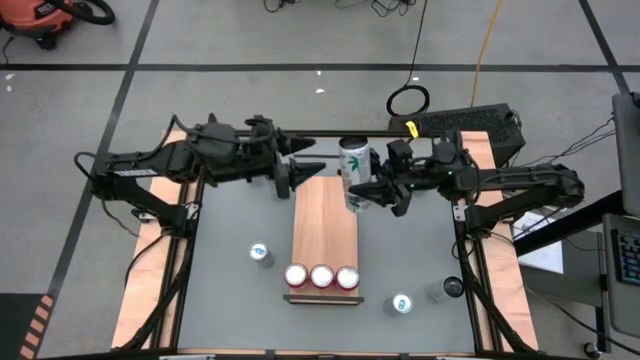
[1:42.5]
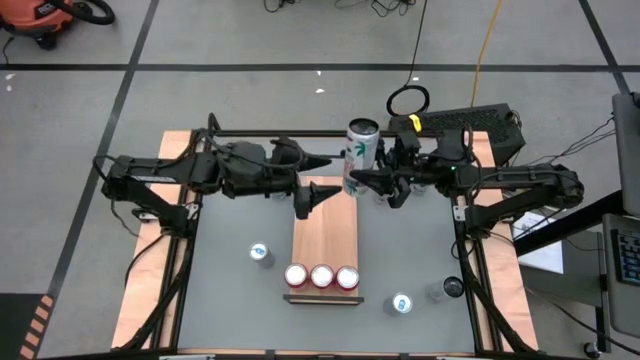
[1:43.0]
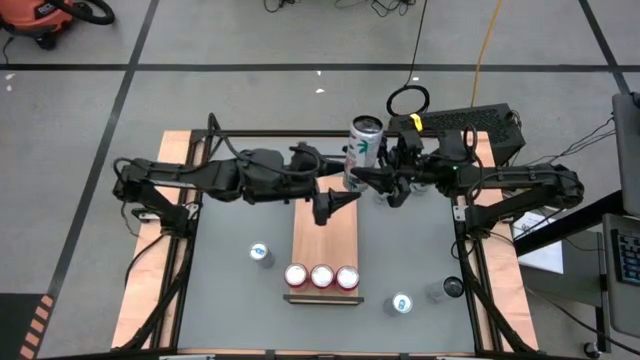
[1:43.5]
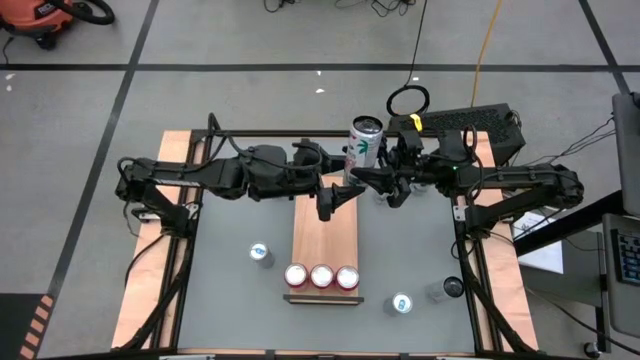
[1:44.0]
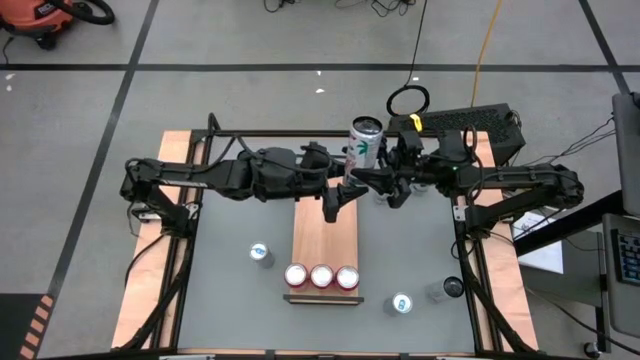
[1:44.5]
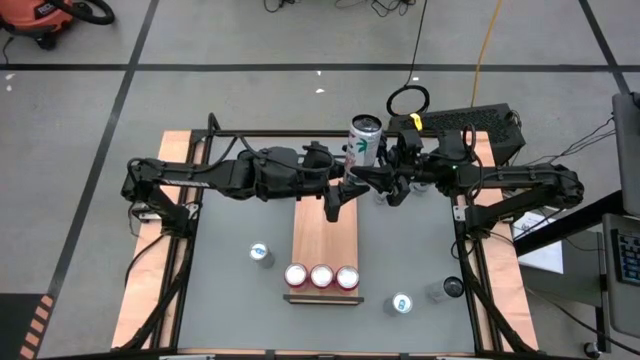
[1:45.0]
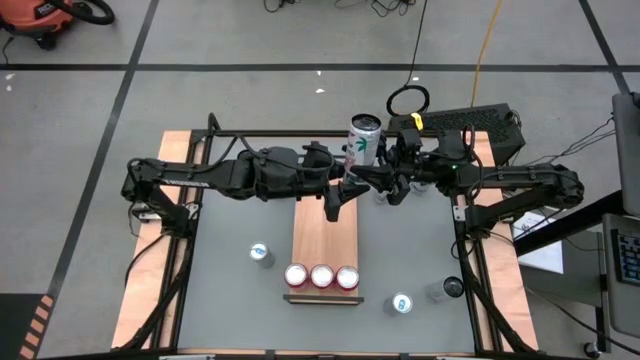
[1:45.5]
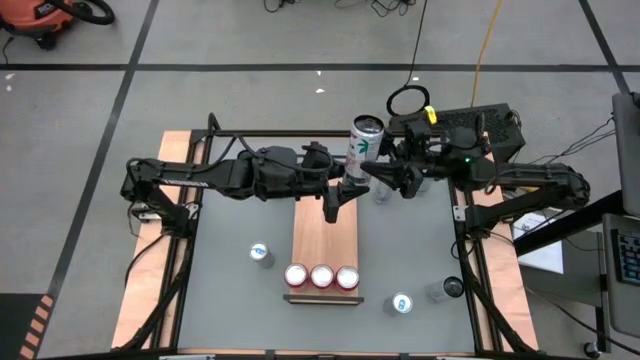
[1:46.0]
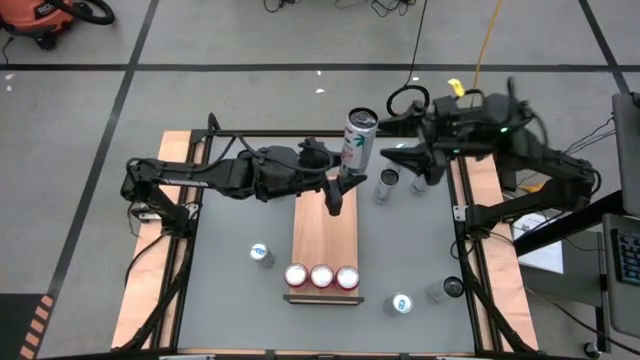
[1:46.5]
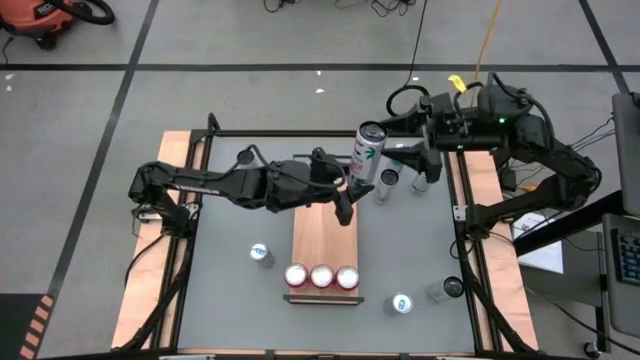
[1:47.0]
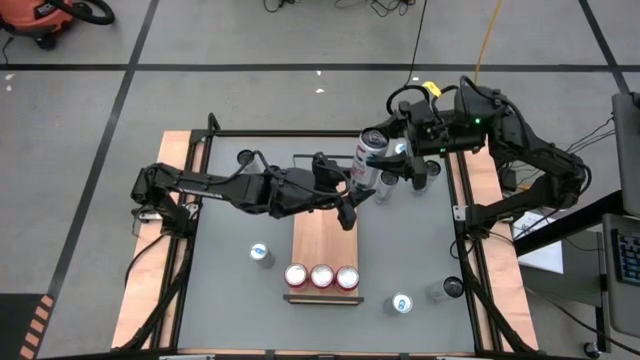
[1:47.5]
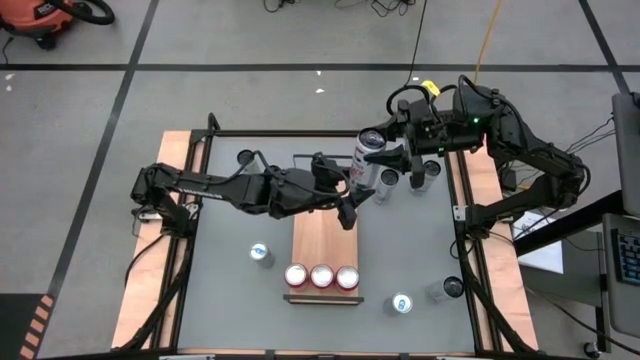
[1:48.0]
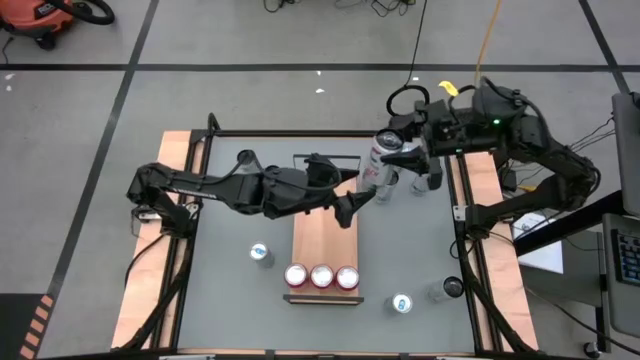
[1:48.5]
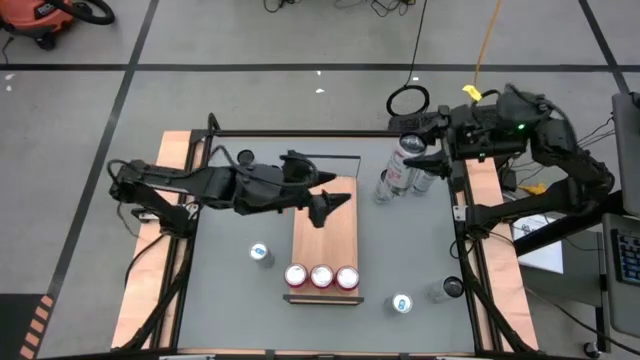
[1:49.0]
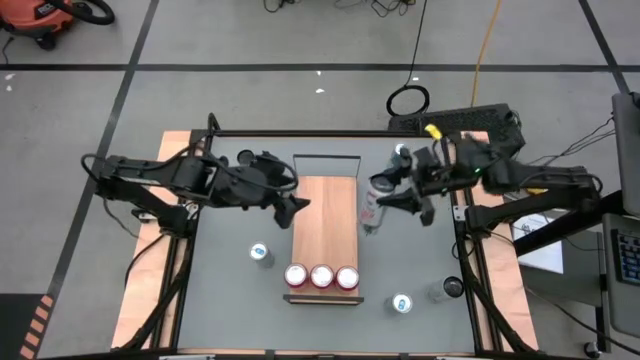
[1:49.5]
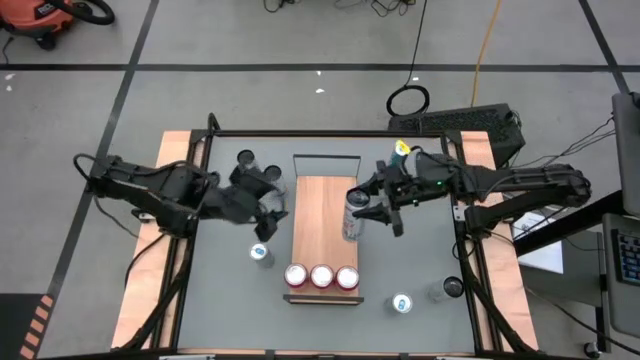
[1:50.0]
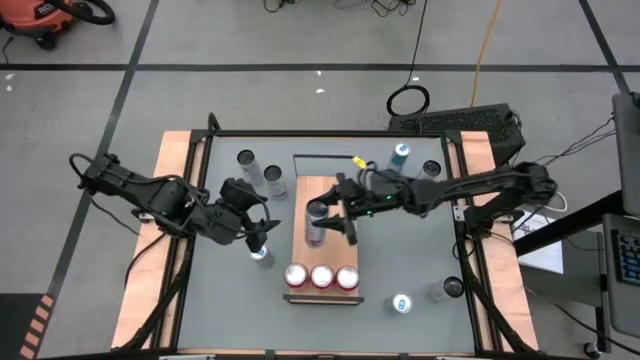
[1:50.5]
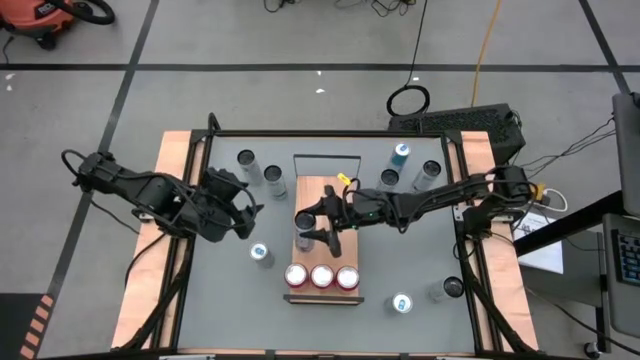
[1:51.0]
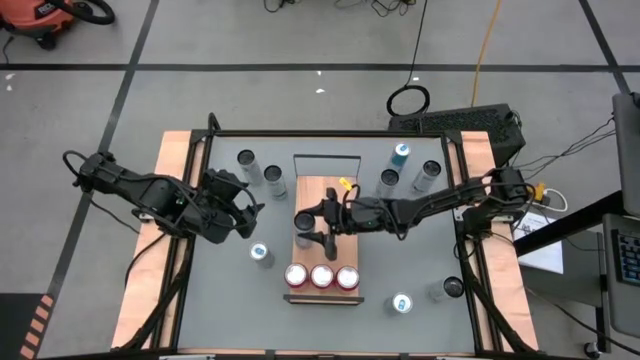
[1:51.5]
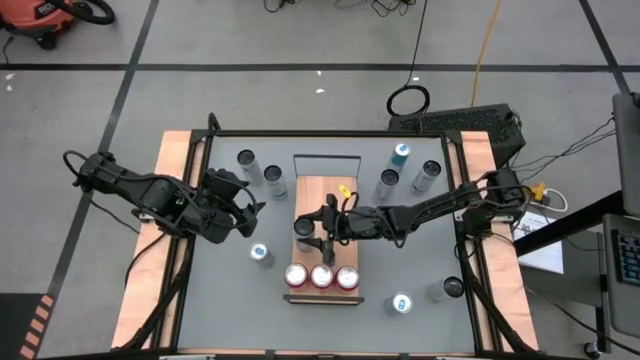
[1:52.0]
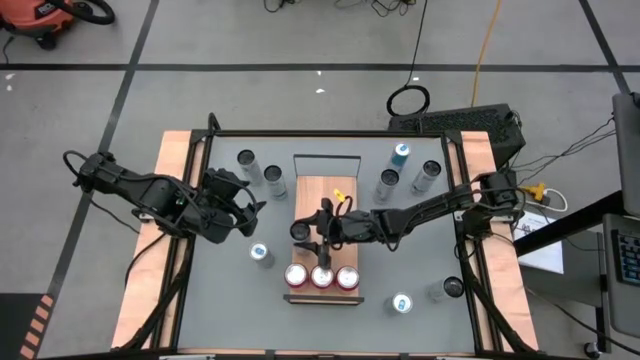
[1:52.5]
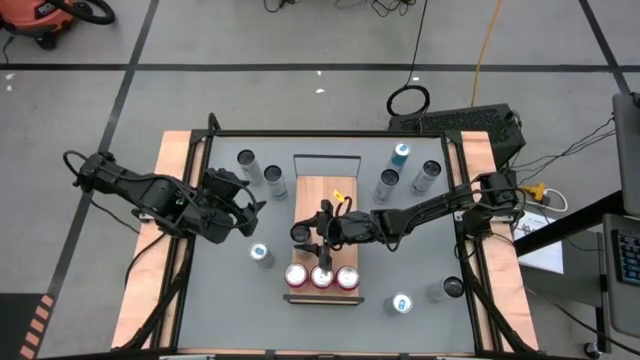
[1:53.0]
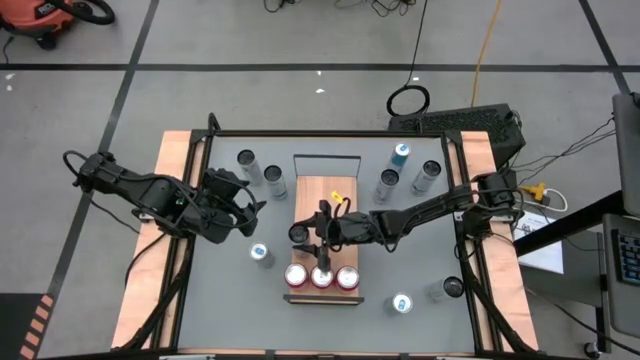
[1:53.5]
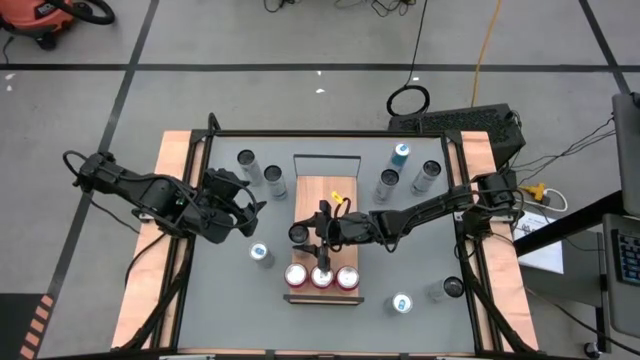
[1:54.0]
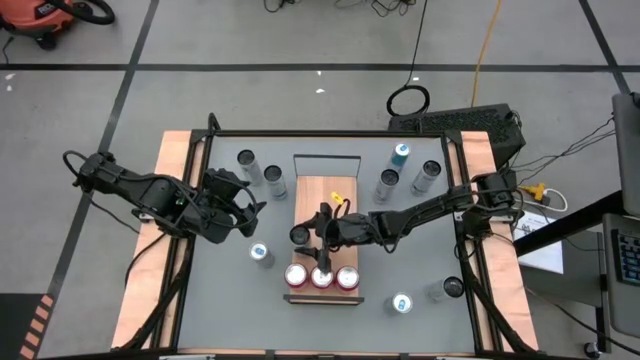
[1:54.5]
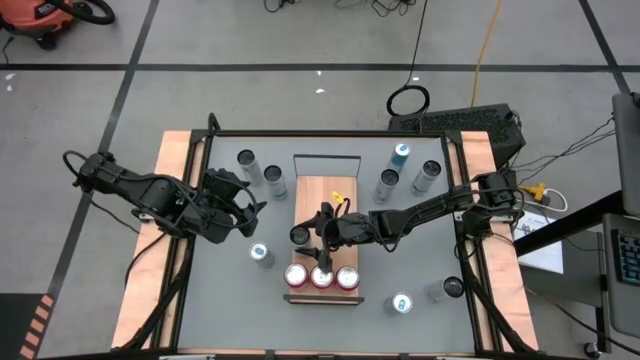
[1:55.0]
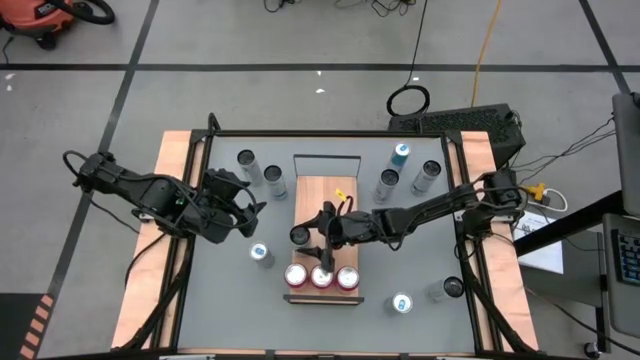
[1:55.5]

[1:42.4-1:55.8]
Task: Sort soda cans
Put the bottom left white pink soda can on the shelf
